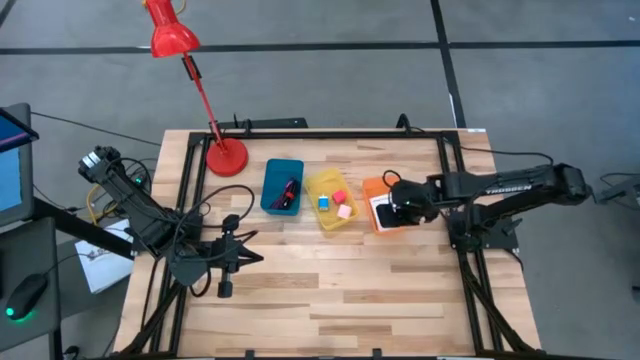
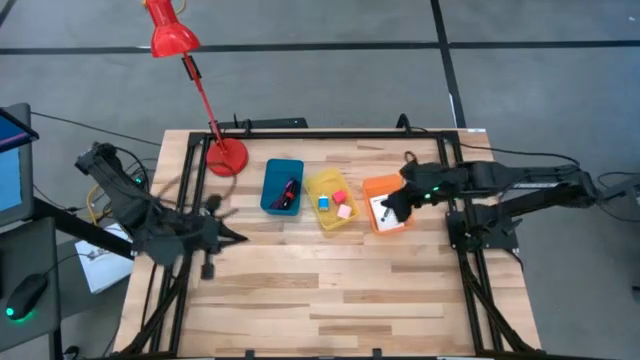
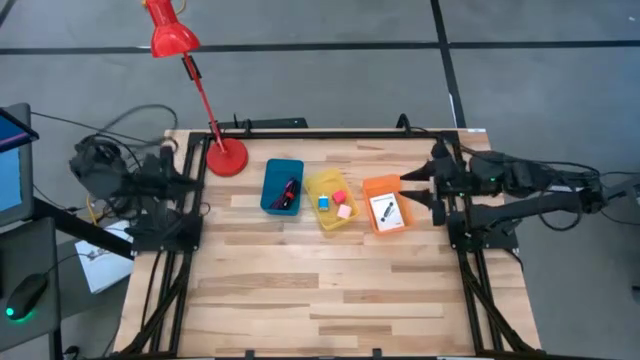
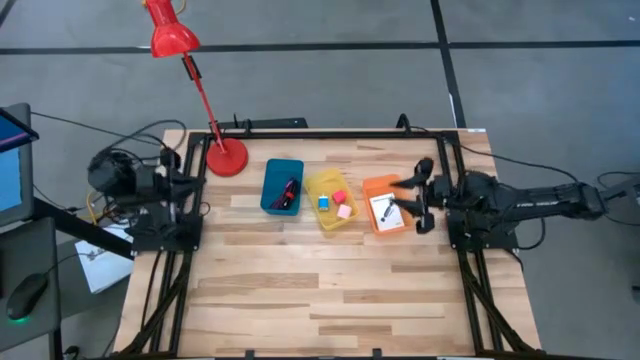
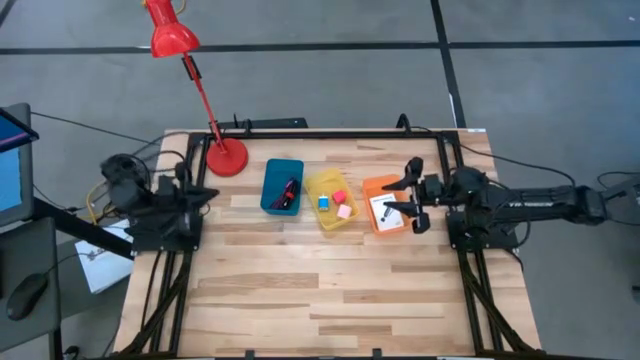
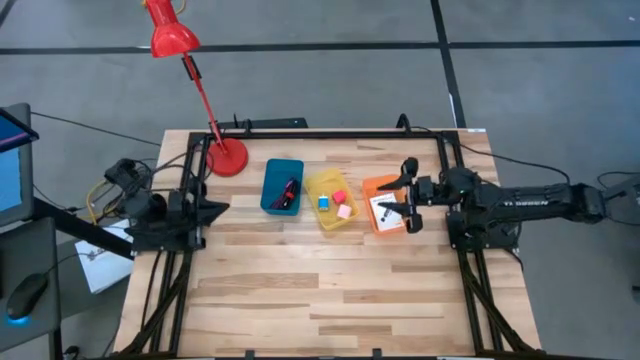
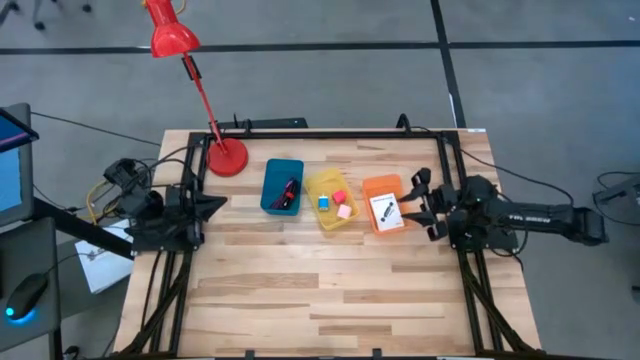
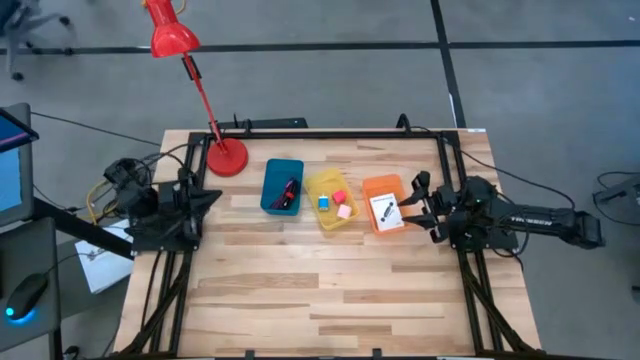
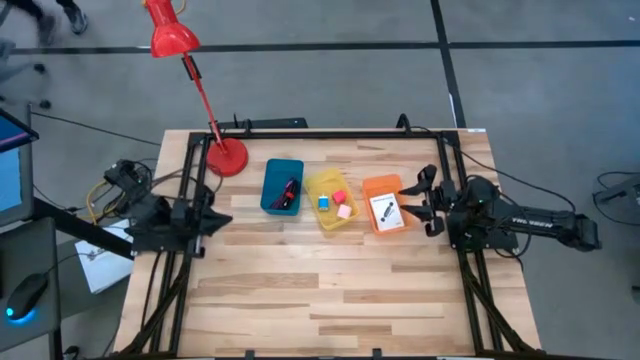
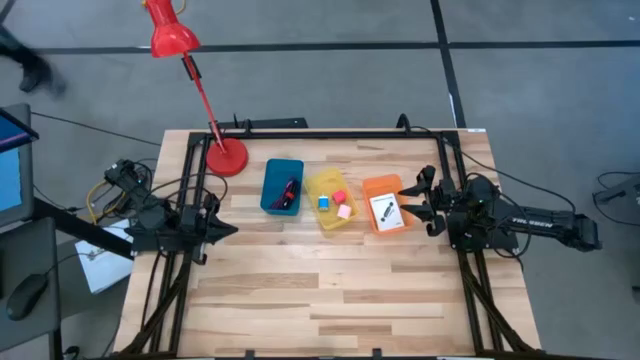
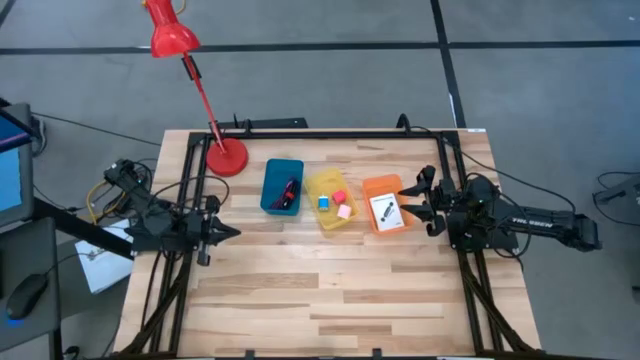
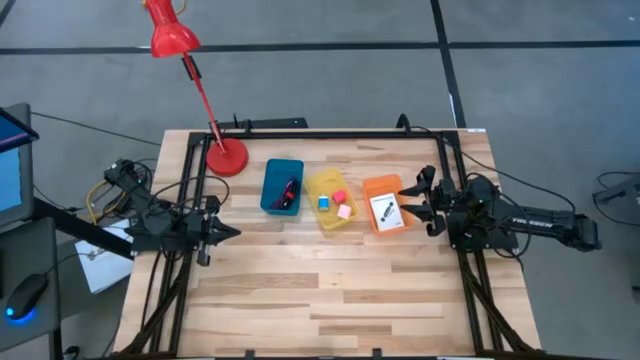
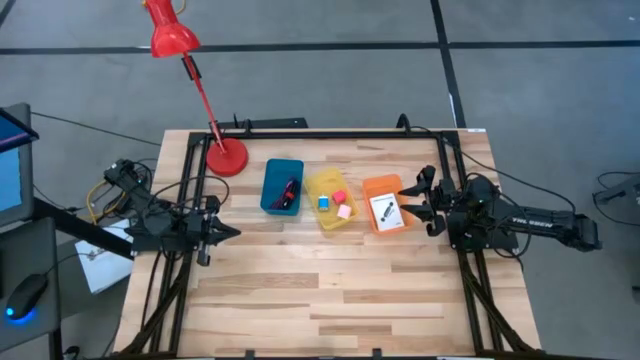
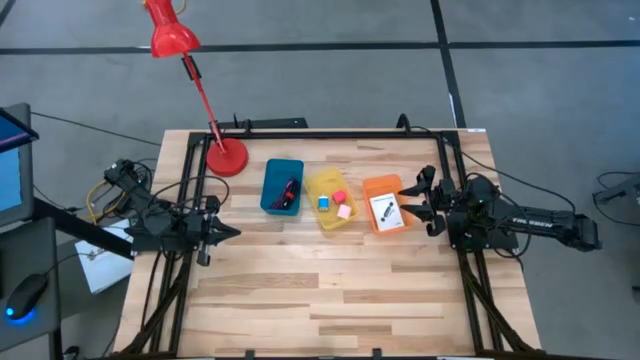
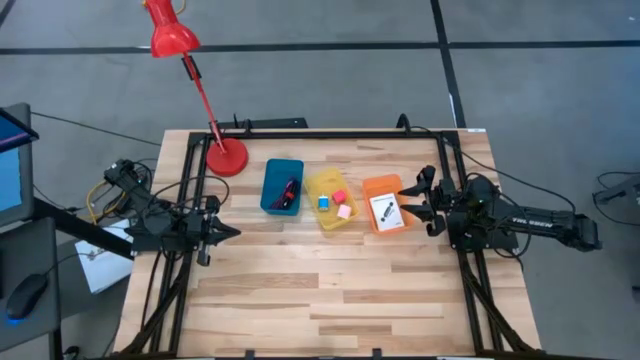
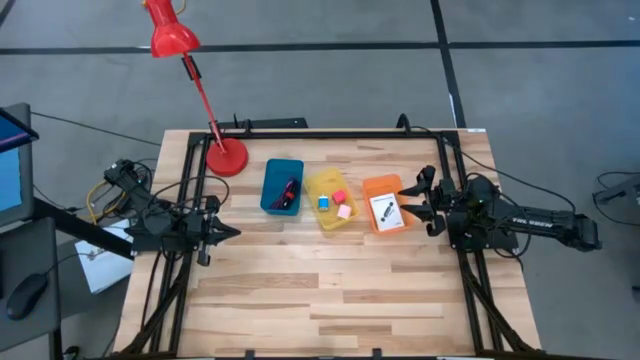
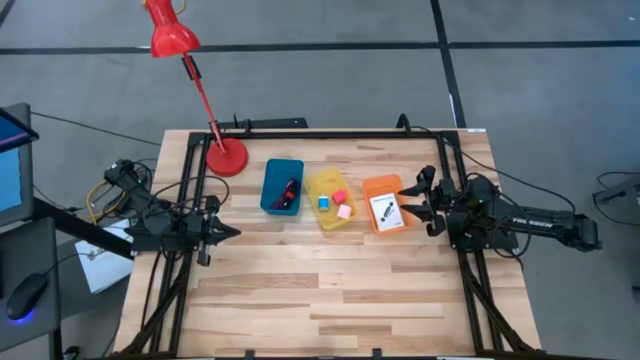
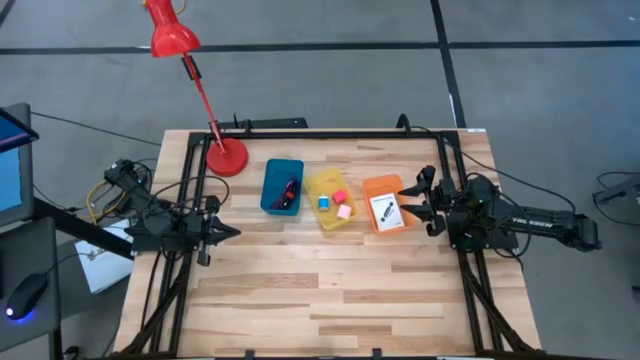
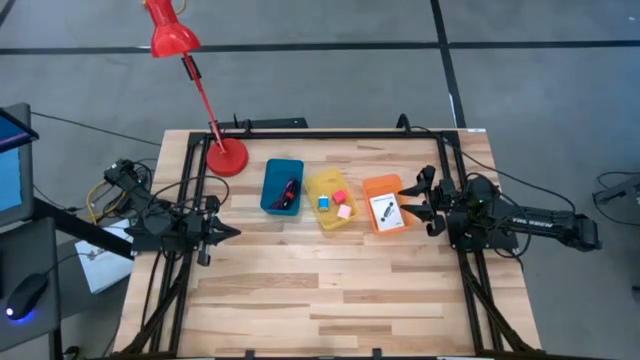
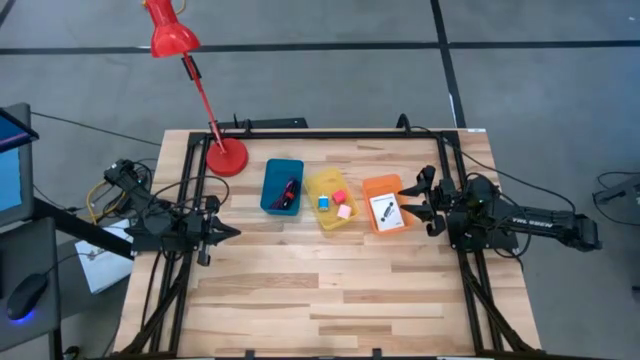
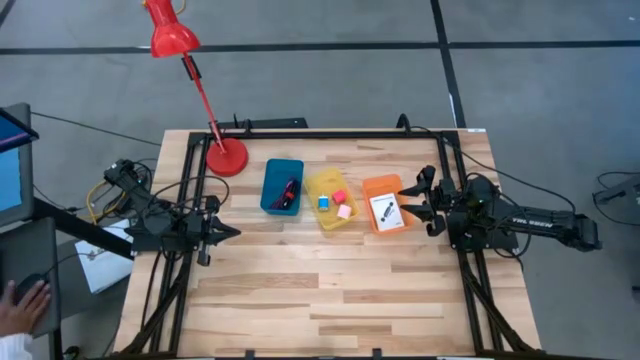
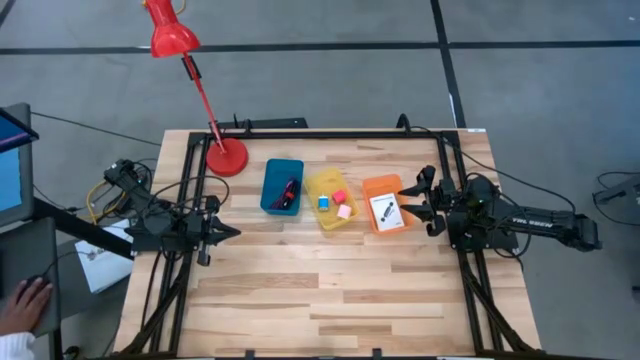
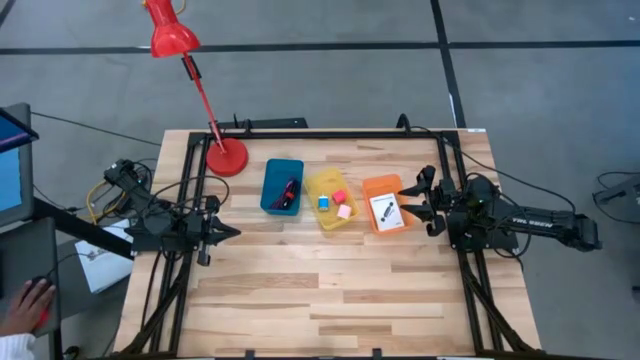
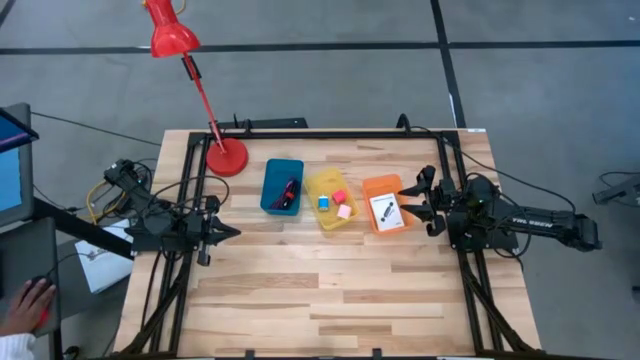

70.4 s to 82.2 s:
Task: Pick and place items into bin
Return to Home Position

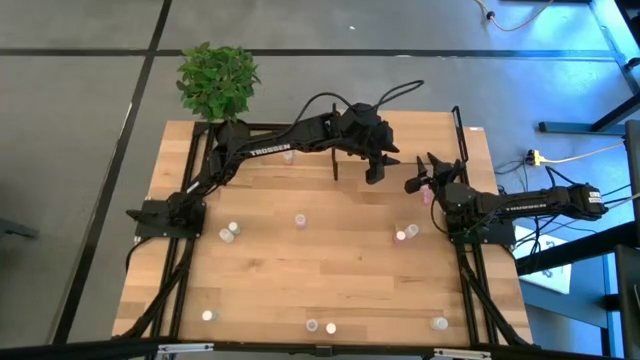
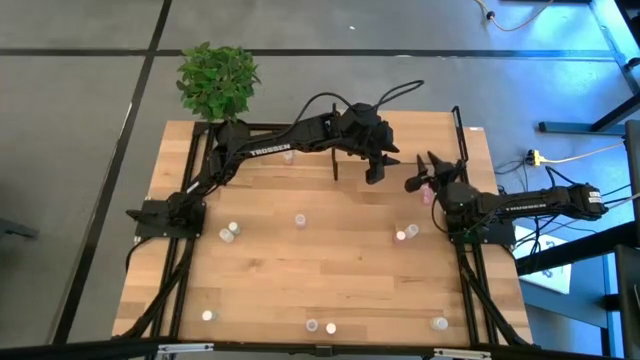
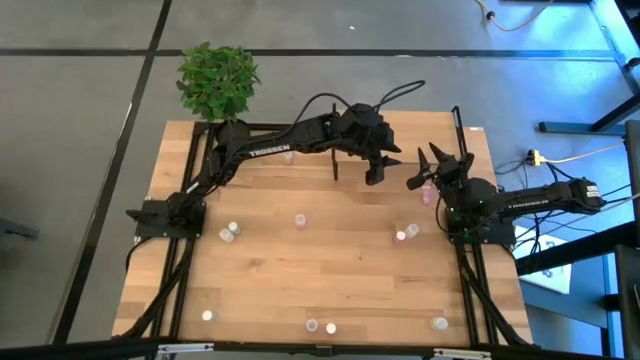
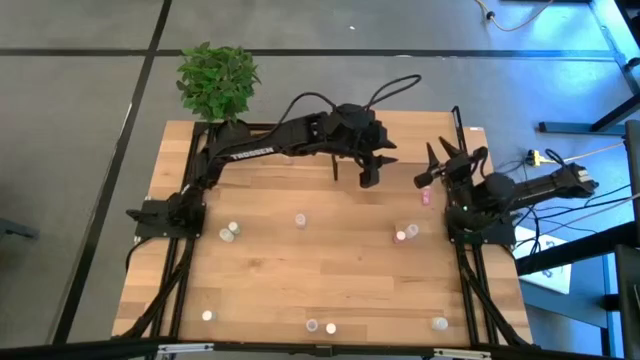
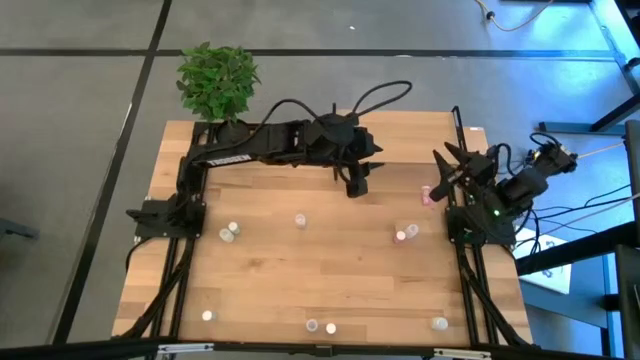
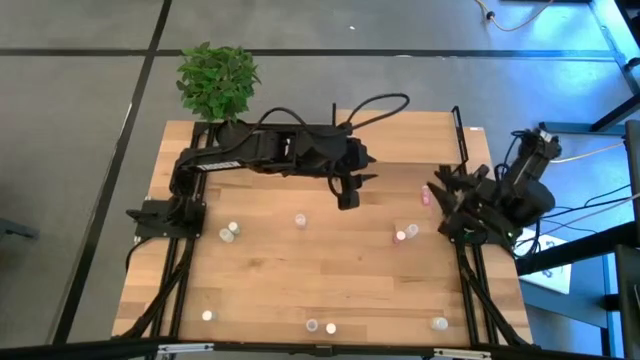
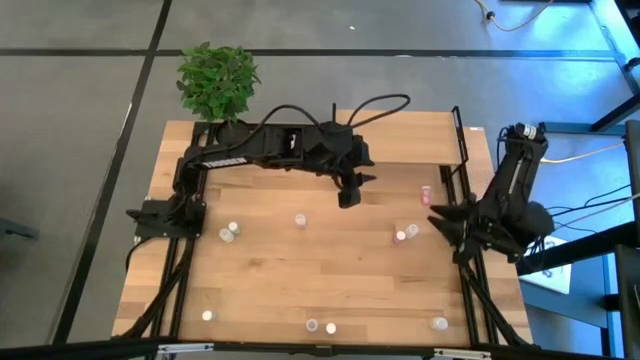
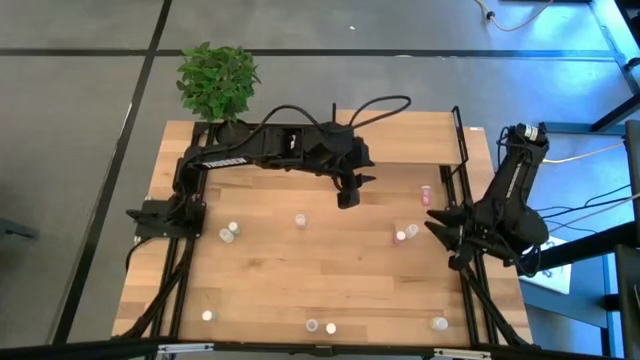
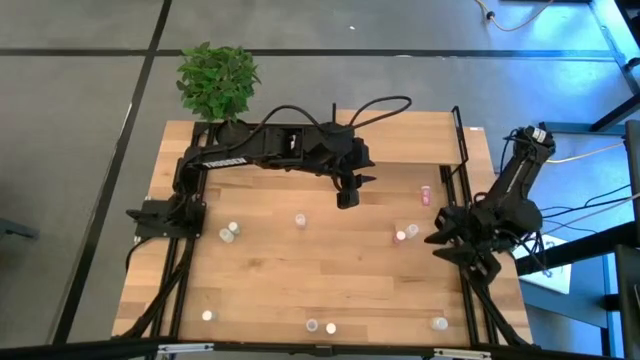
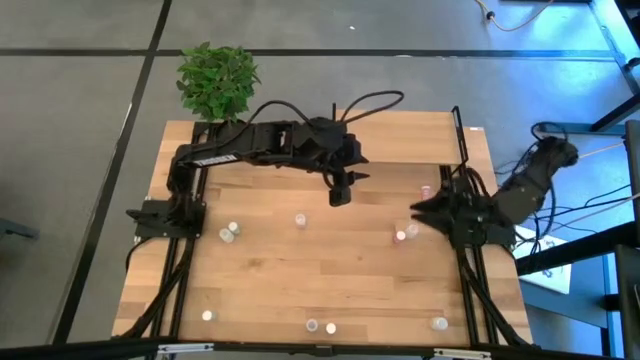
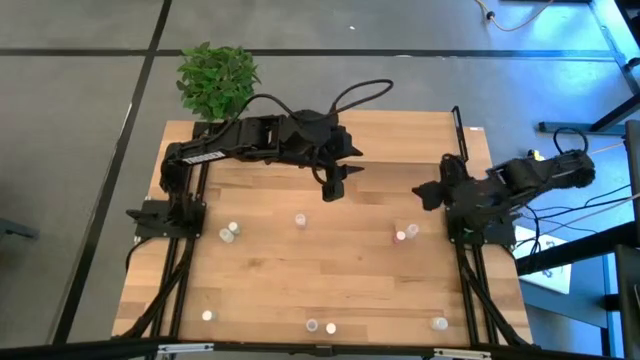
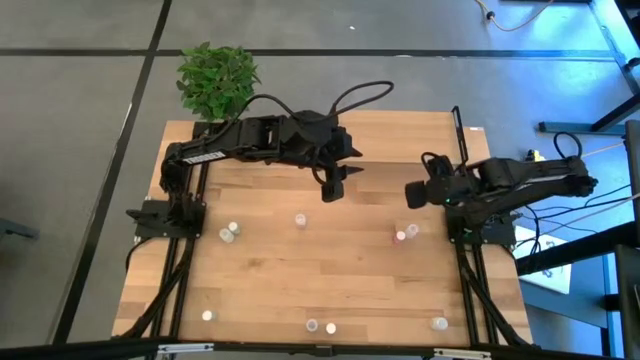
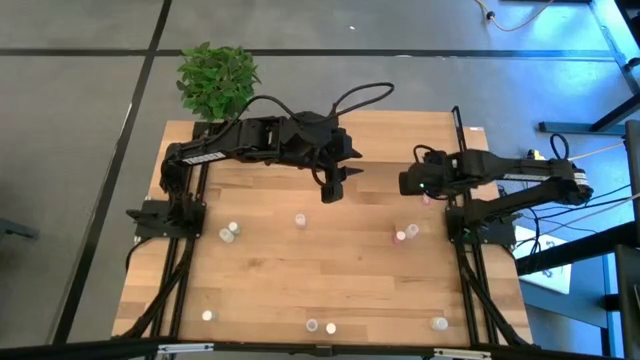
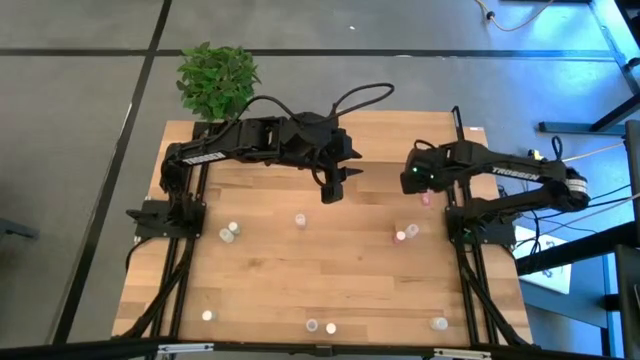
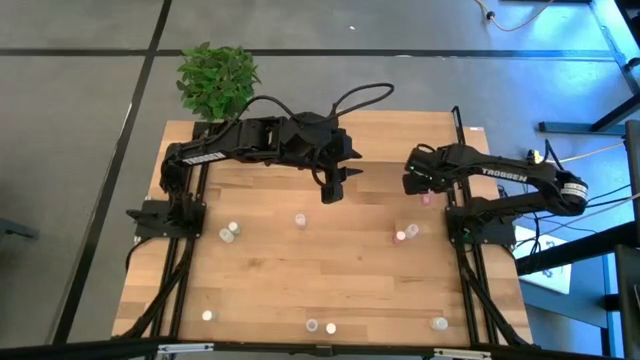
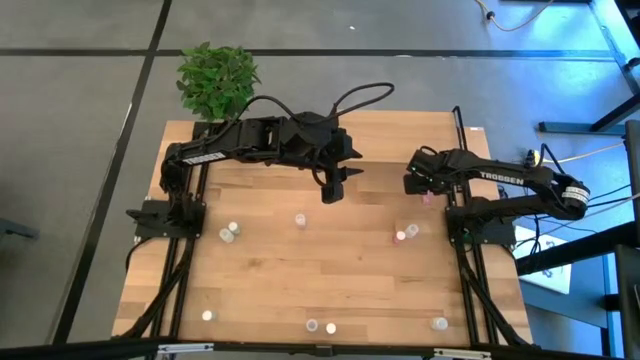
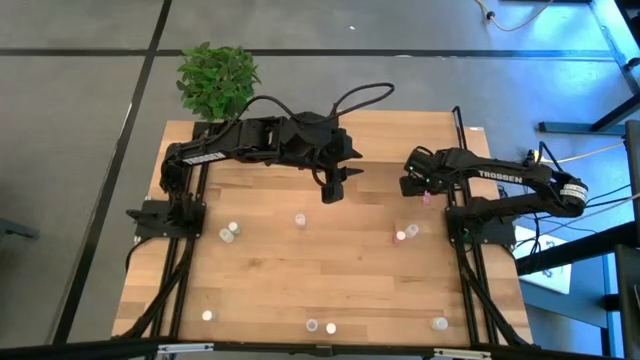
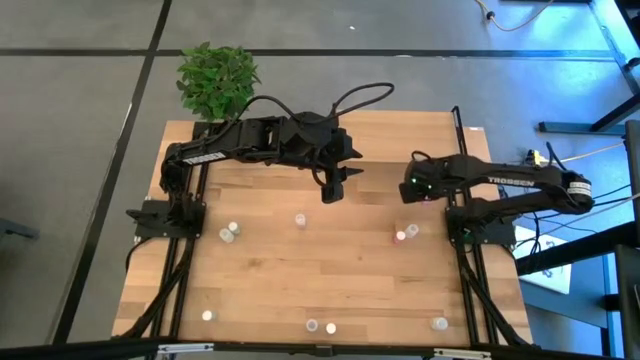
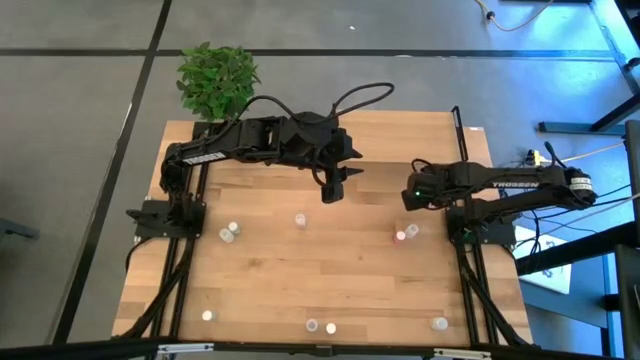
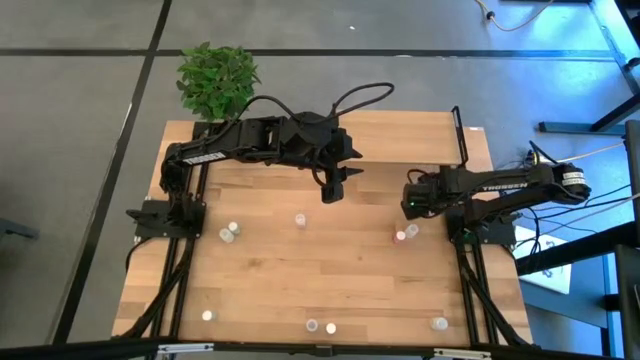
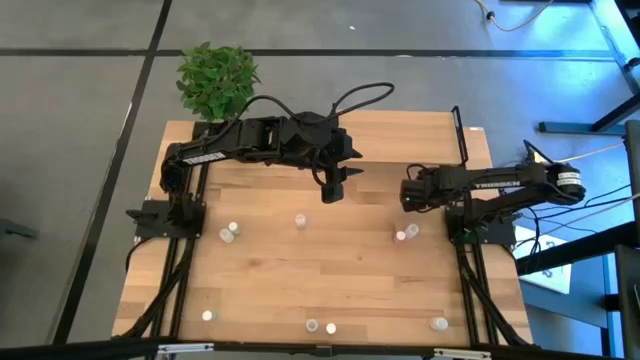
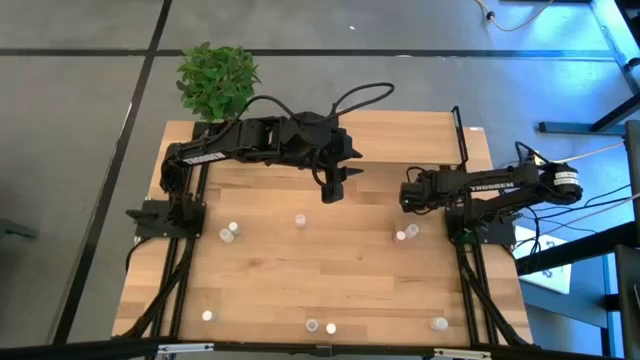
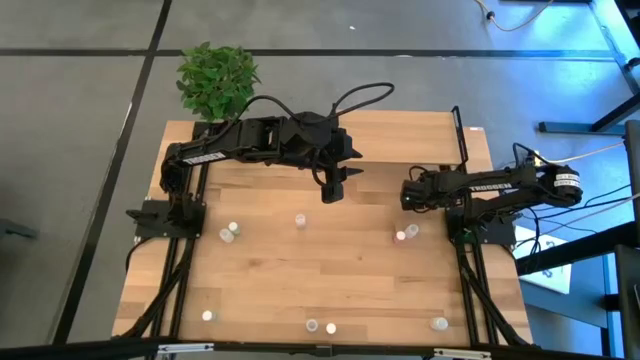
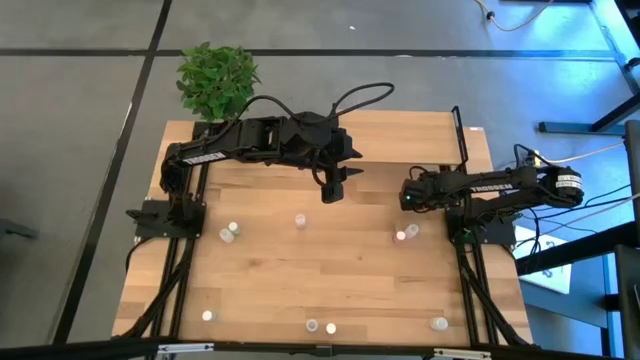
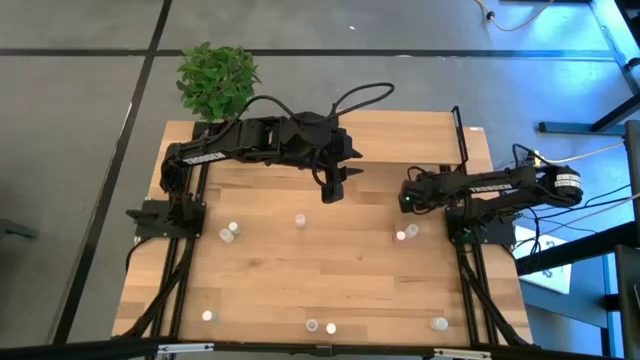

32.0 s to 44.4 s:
Task: Pick and place medicine bottles onto shelf by color
Move the top pink pill bottle to the center of the table
